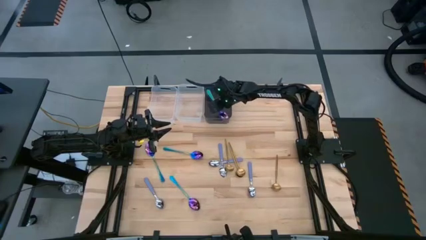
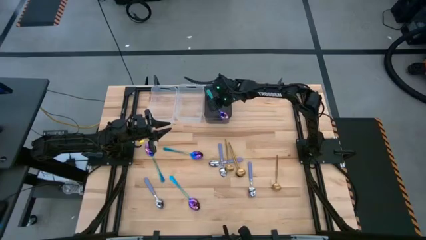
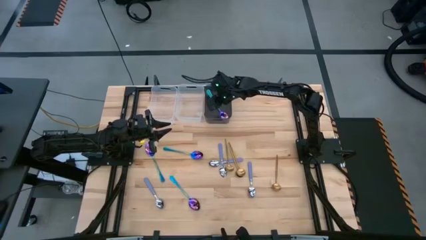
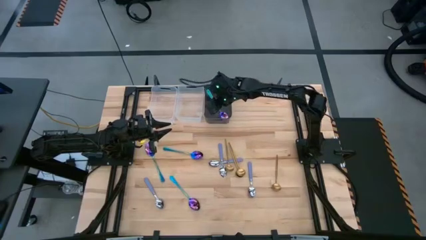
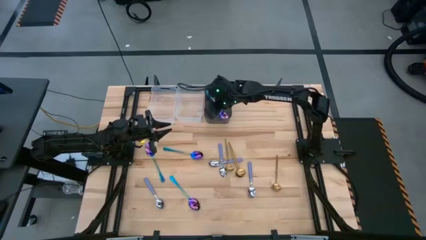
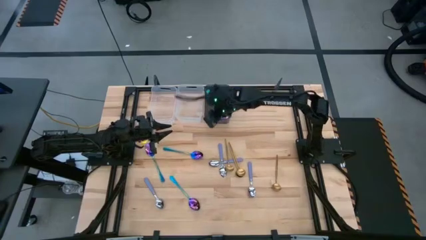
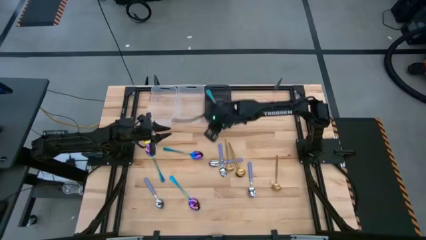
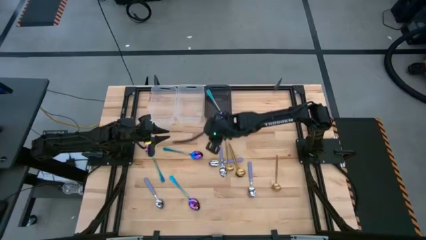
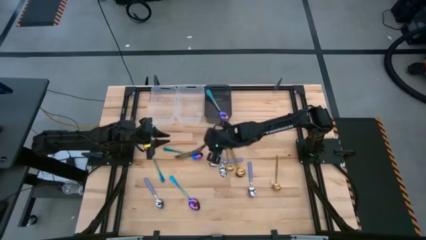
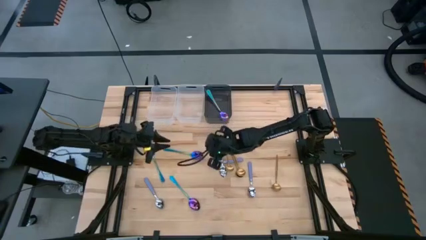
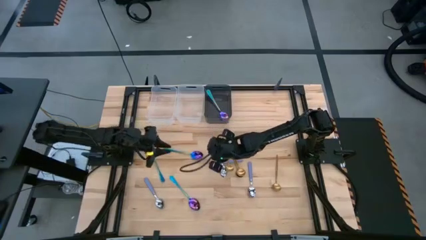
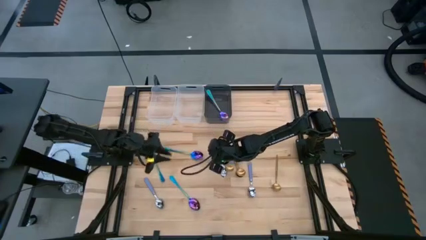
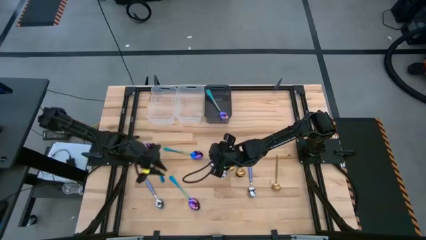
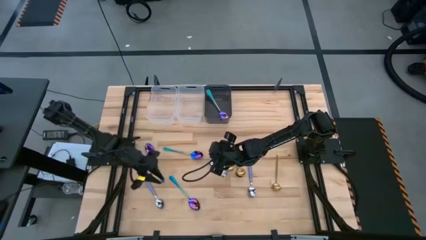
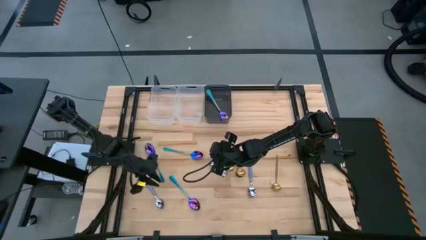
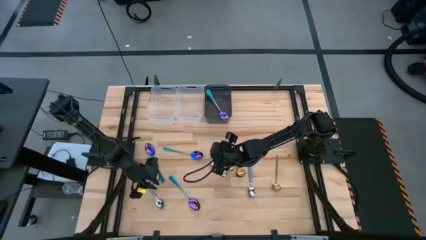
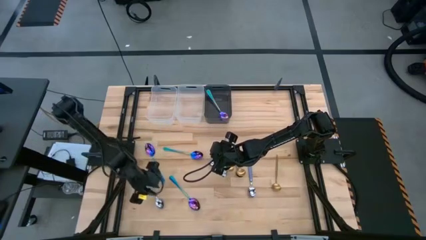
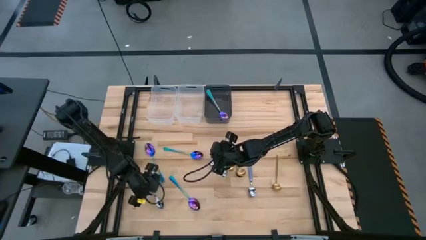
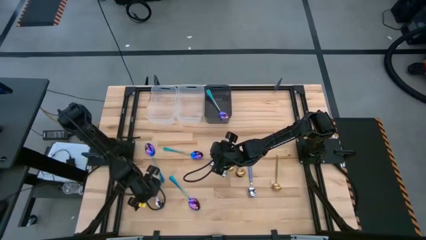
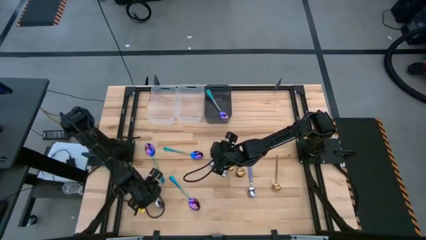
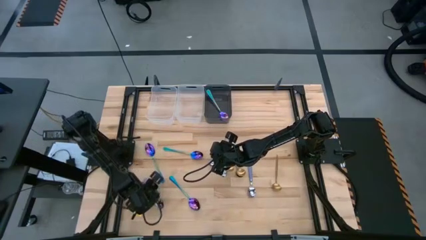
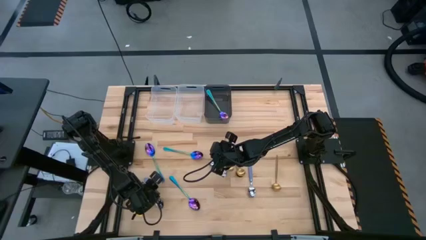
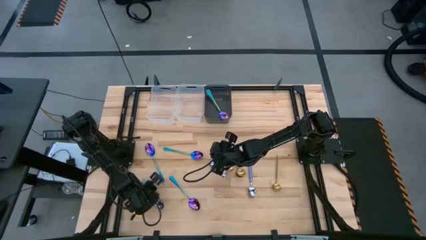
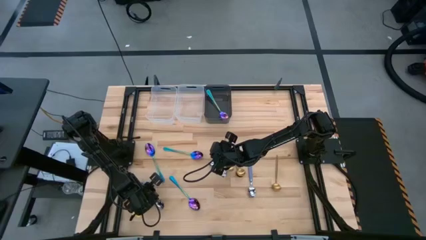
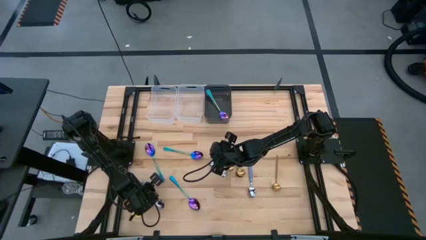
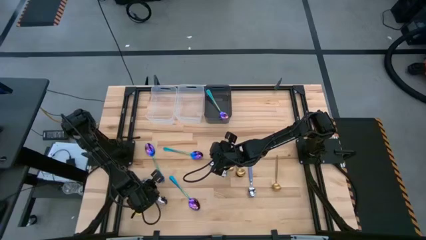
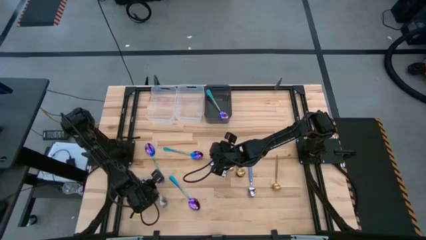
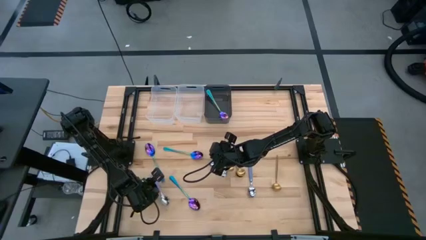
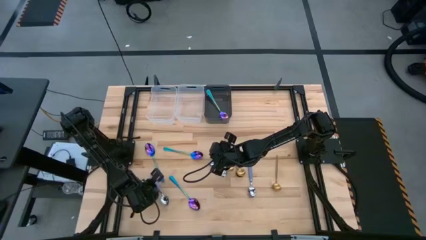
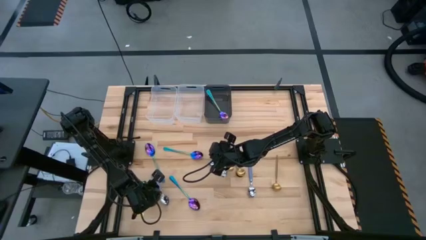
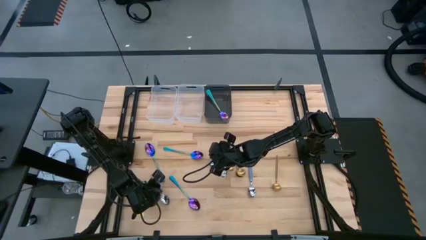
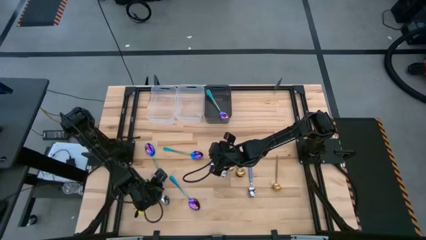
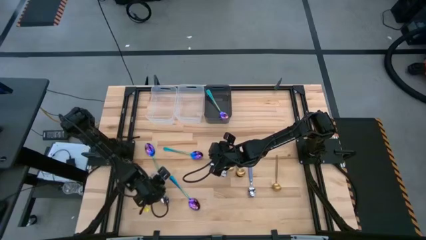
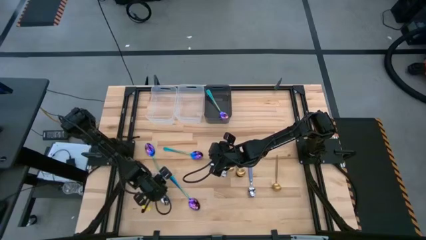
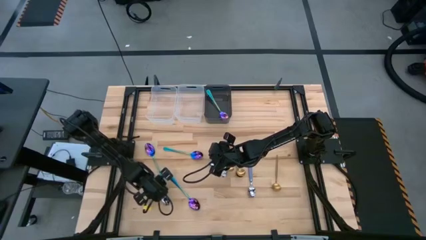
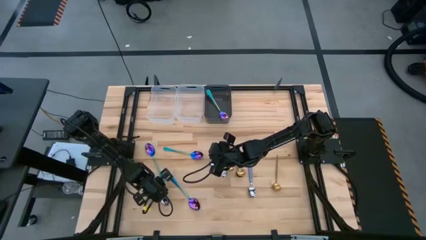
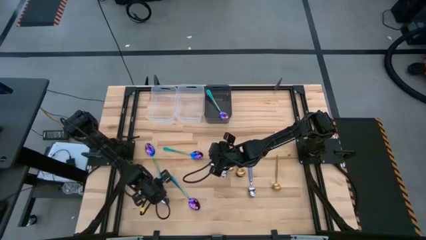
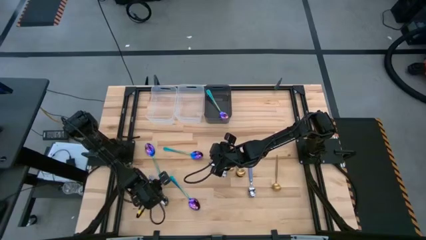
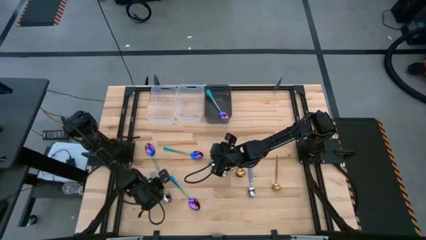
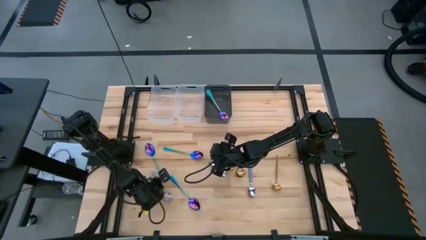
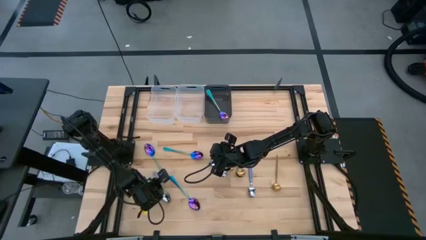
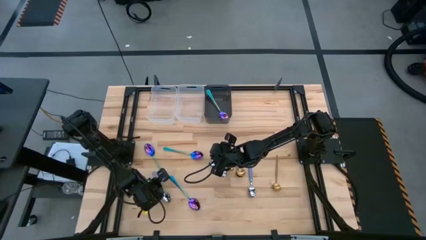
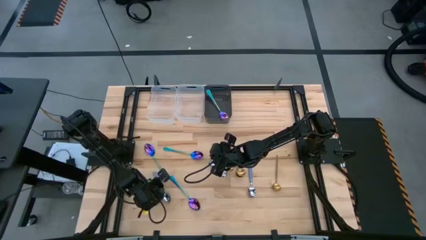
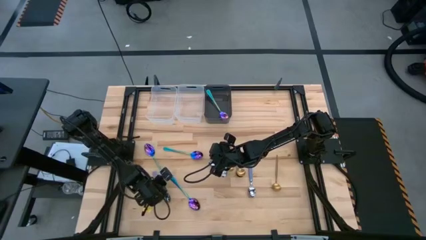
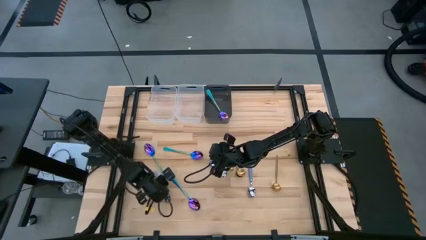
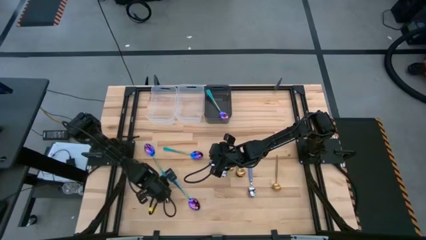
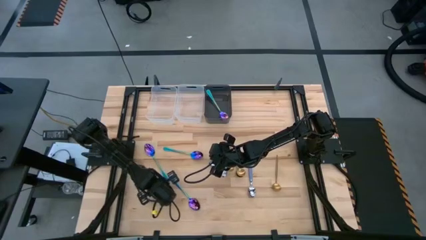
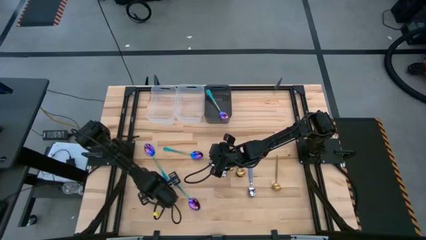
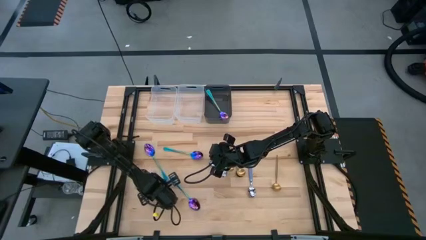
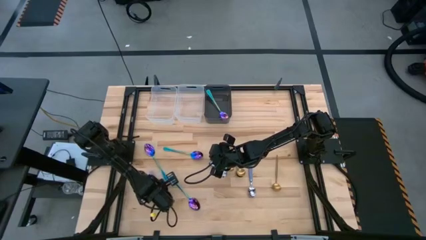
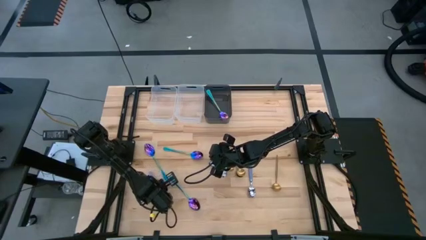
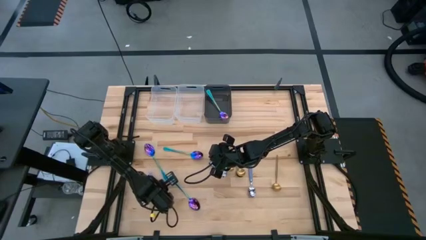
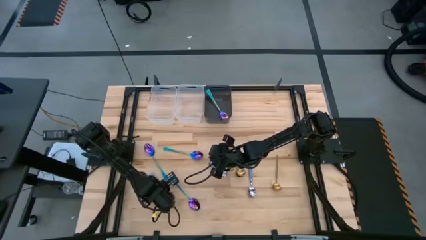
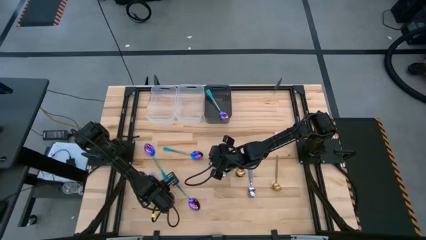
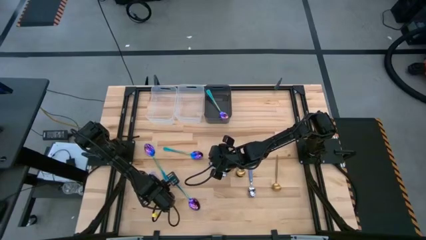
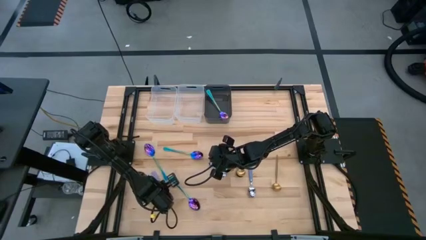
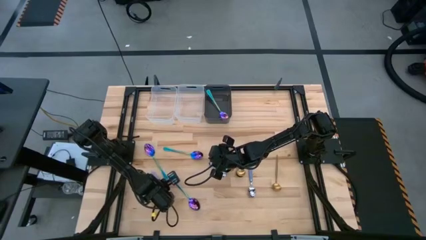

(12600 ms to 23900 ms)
Task: Sort silverware by color (type)
Put the violet spoon into the left transparent bin

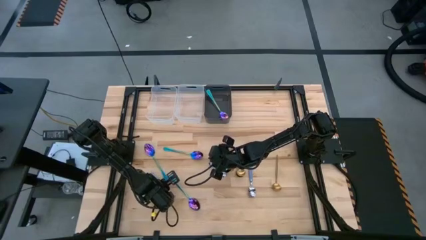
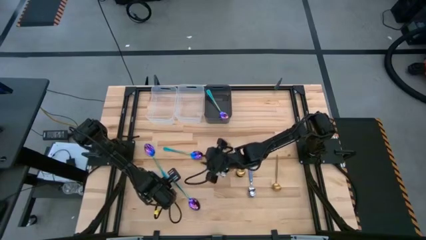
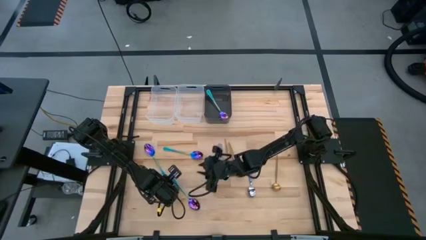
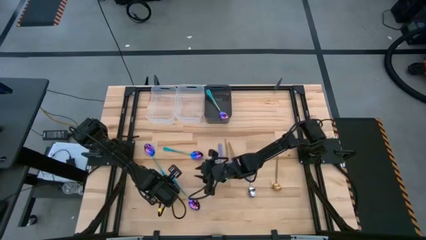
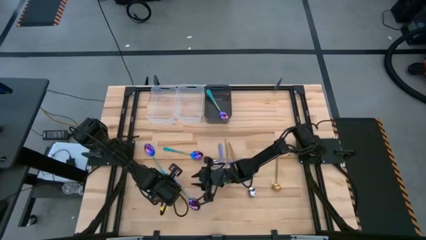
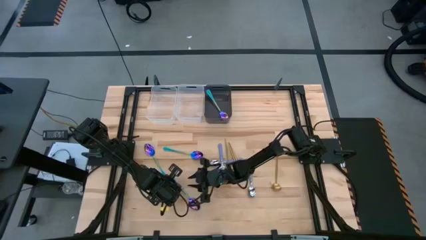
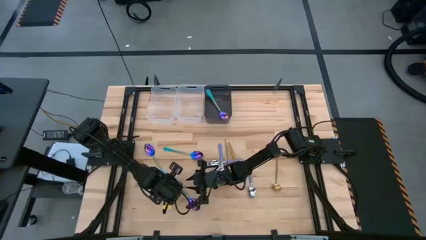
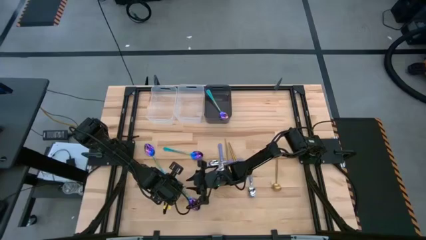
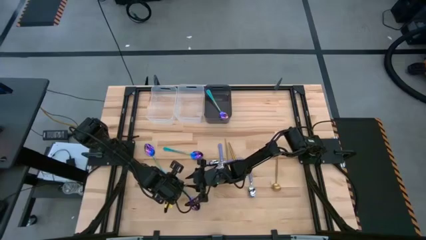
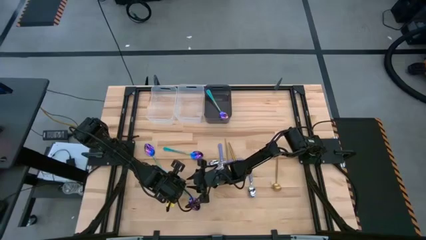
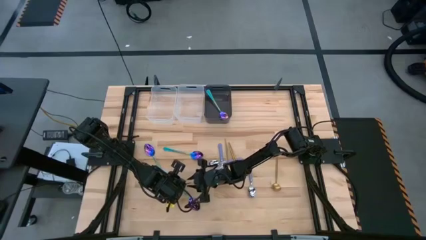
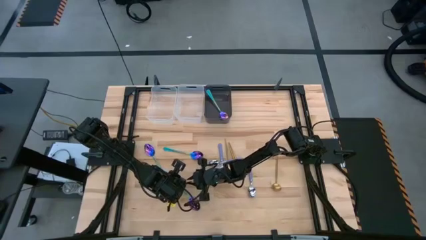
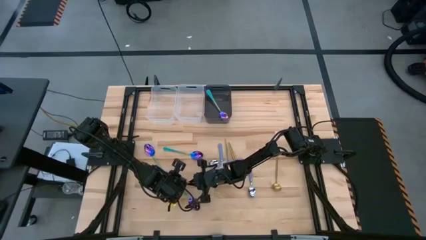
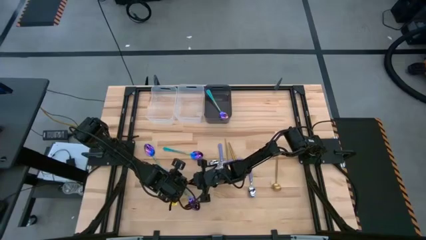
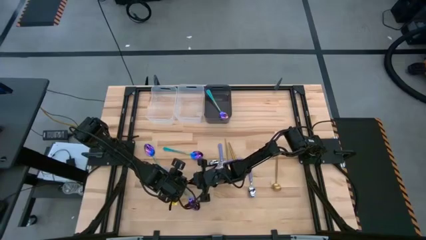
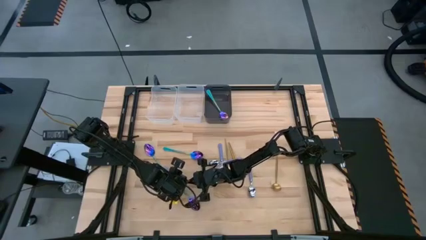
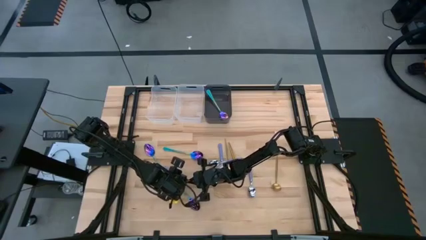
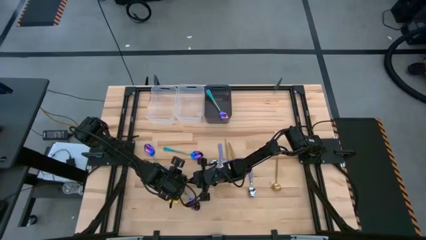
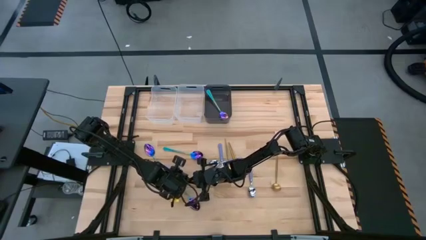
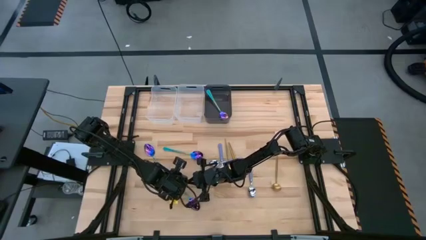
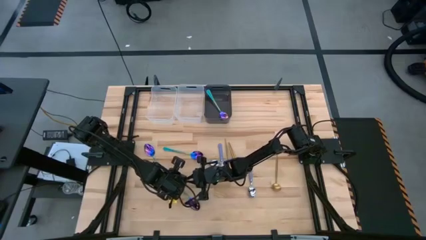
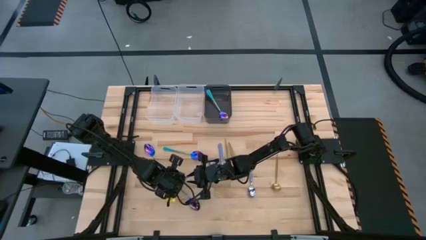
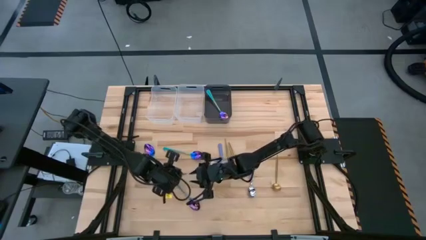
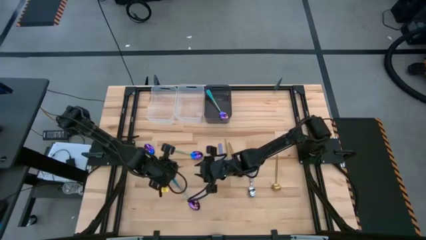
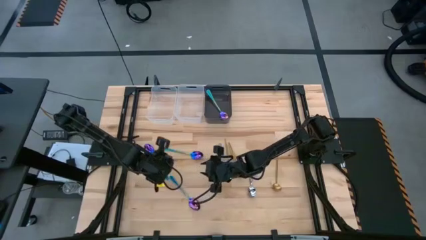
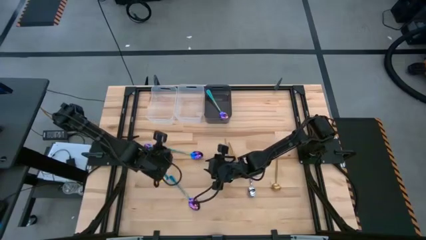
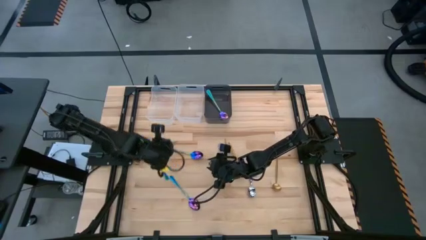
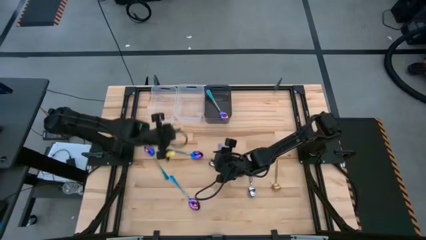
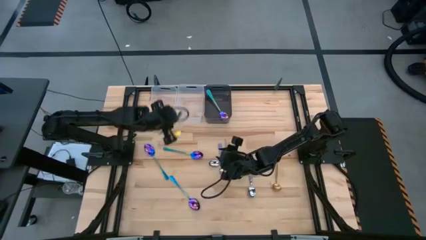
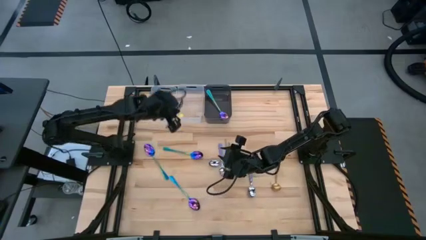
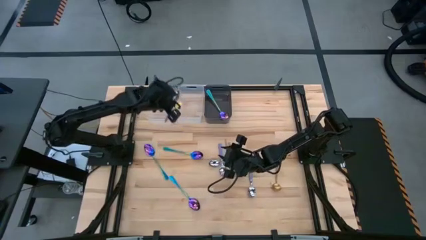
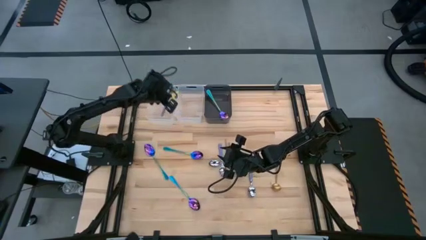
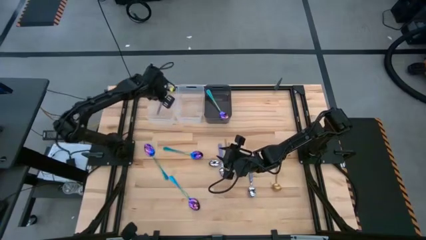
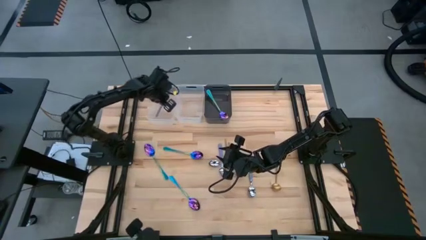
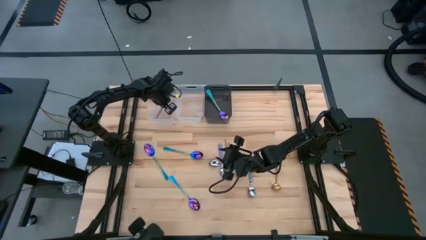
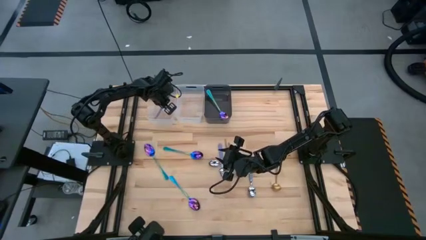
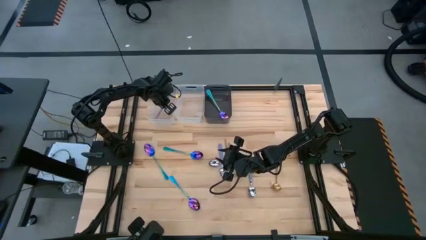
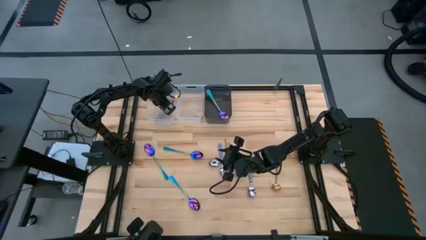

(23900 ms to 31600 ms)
Put the violet spoon into the left transparent bin
